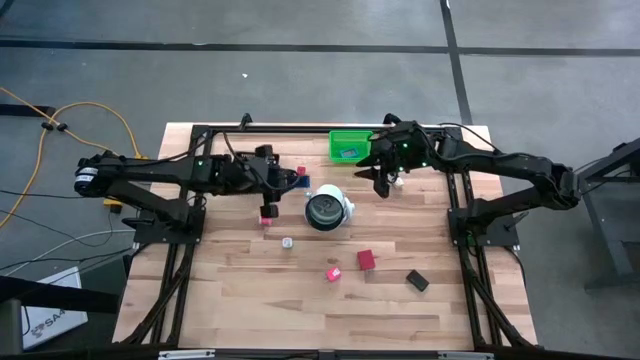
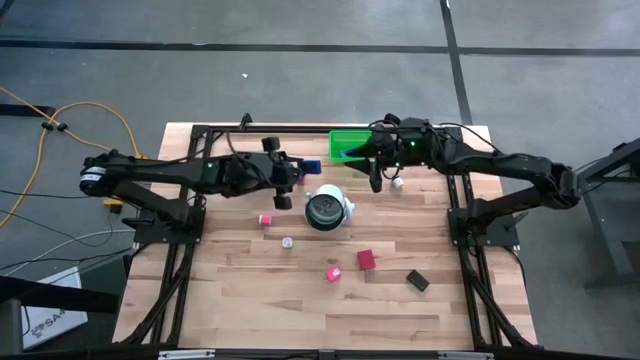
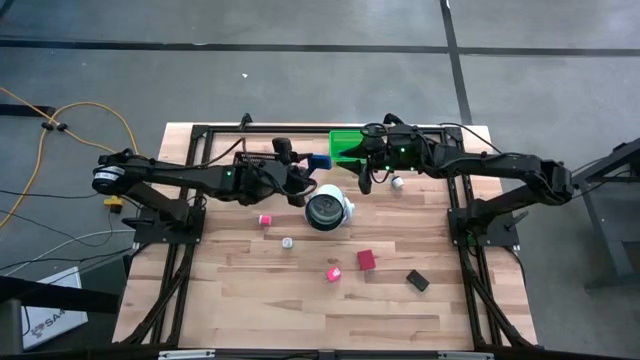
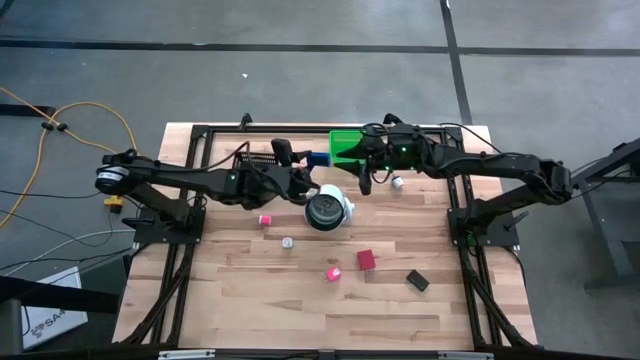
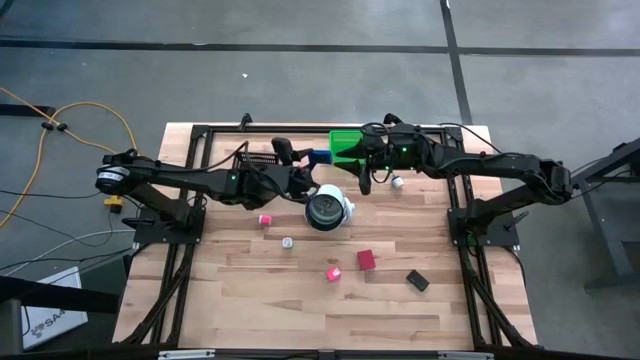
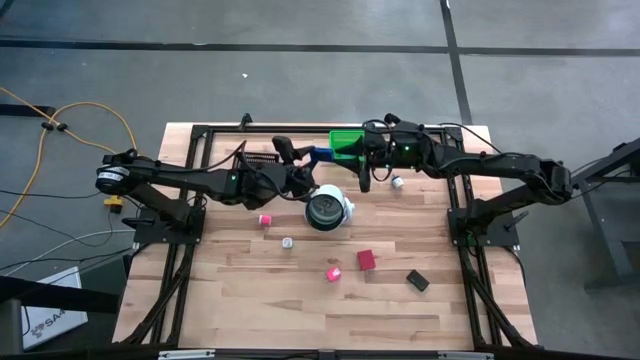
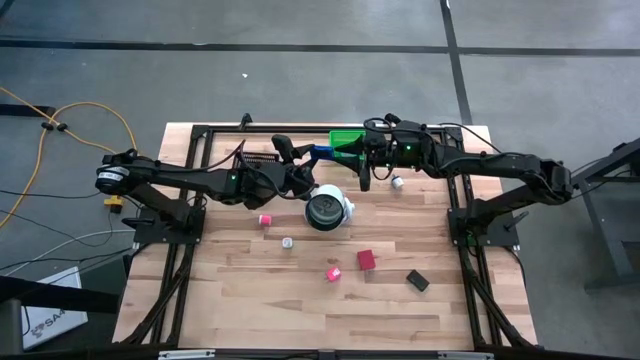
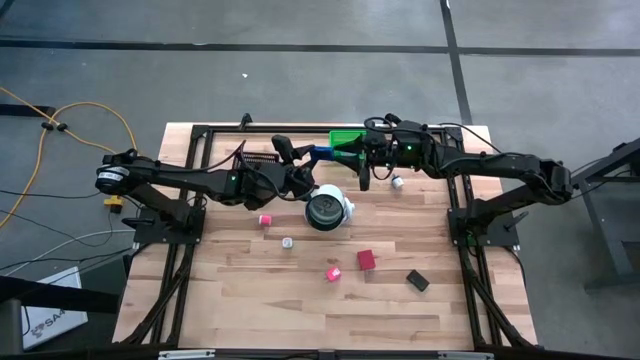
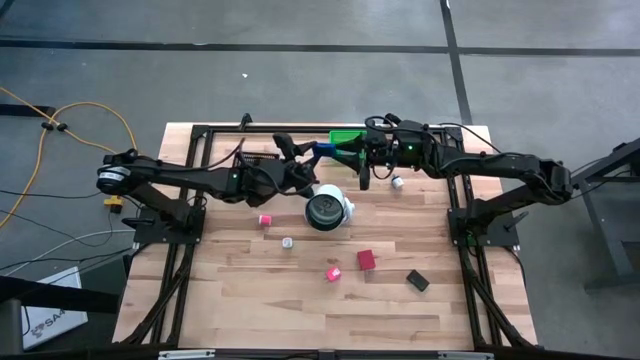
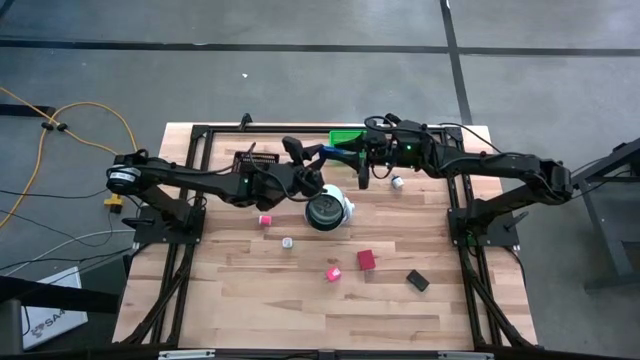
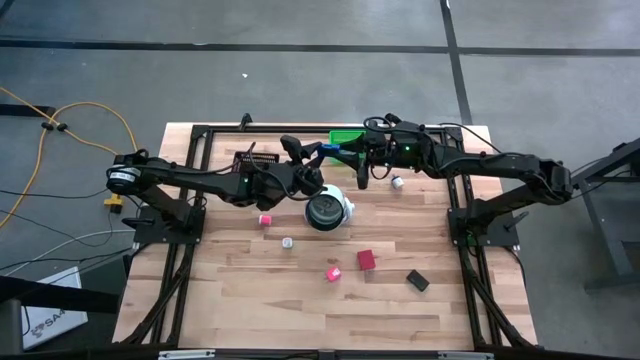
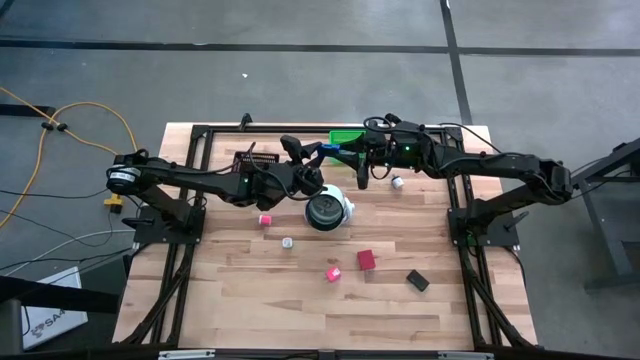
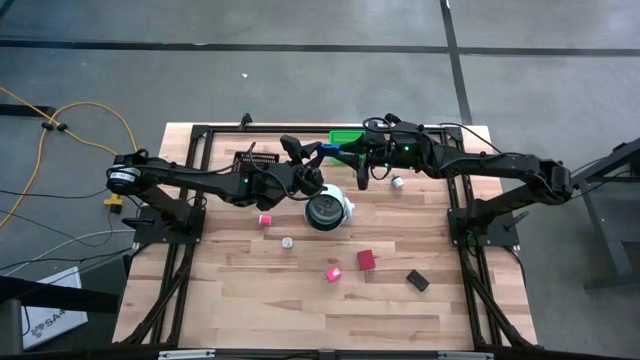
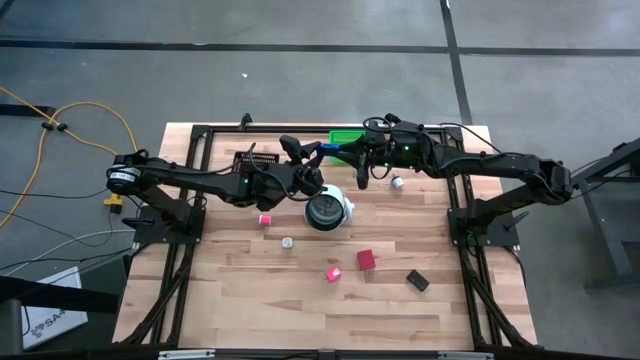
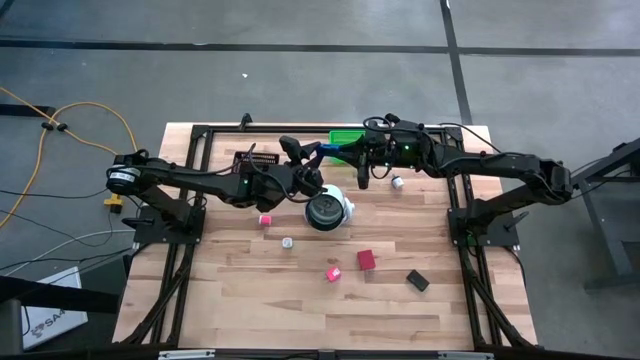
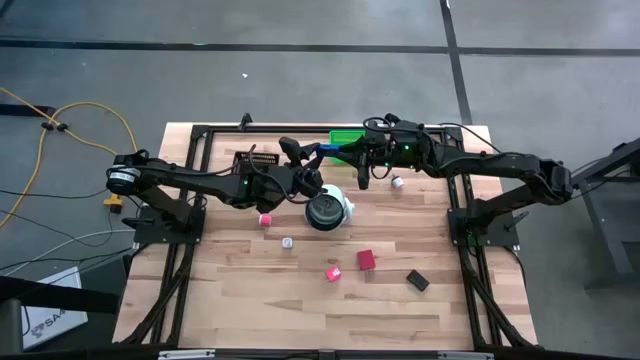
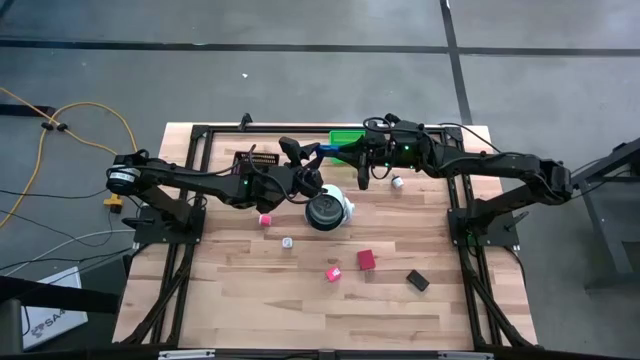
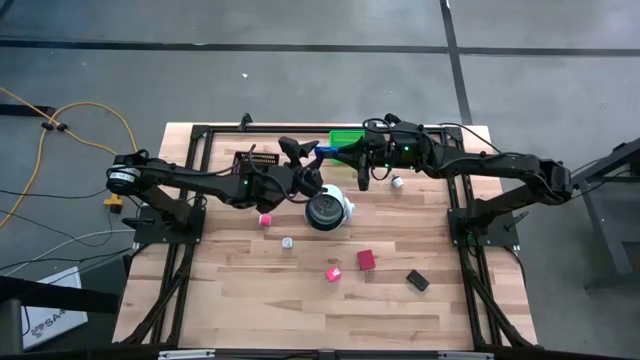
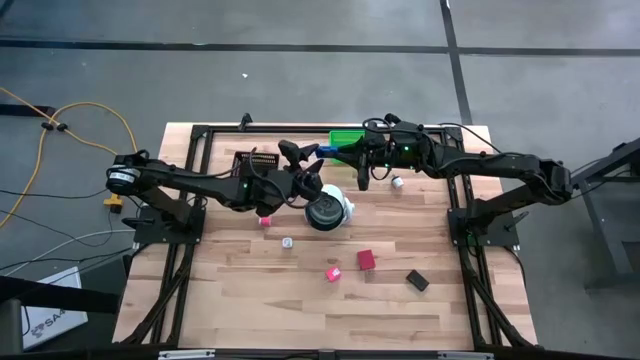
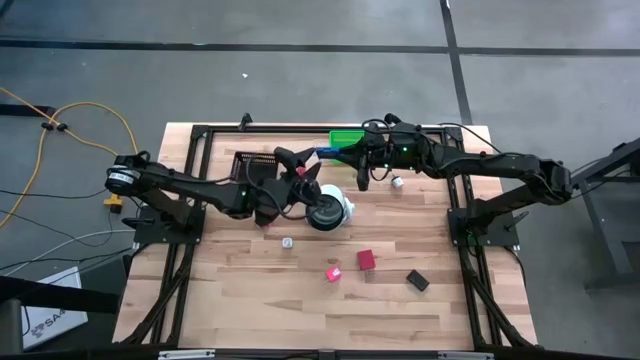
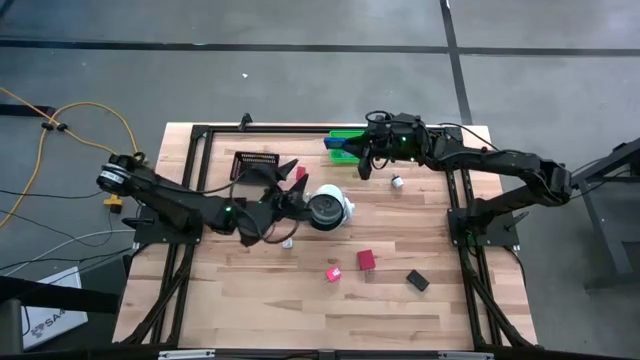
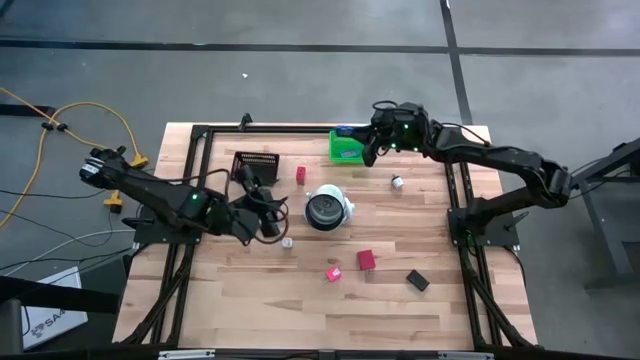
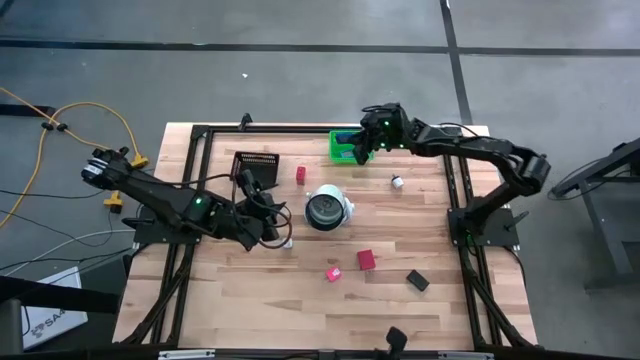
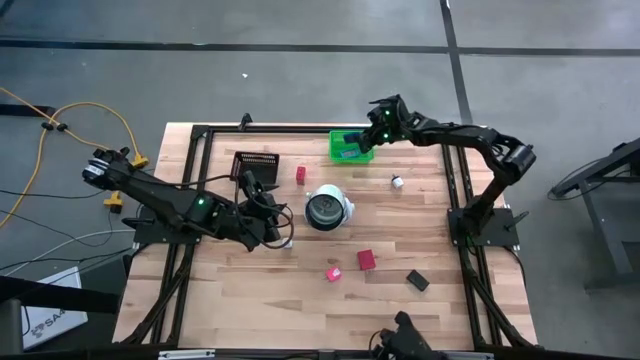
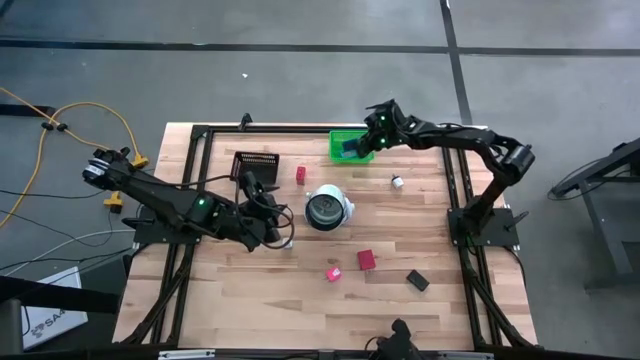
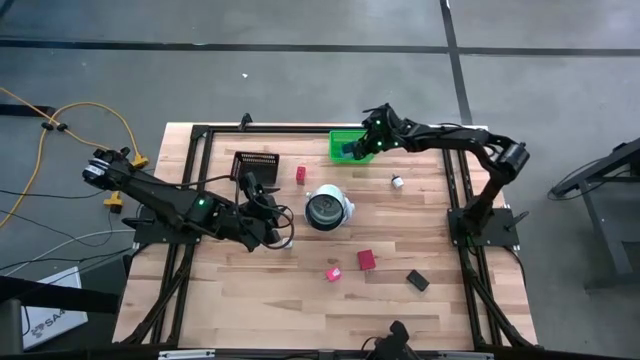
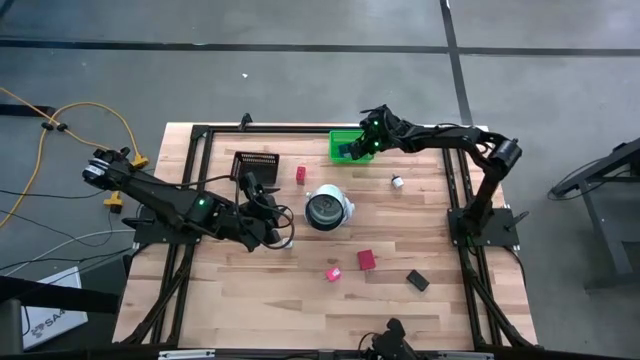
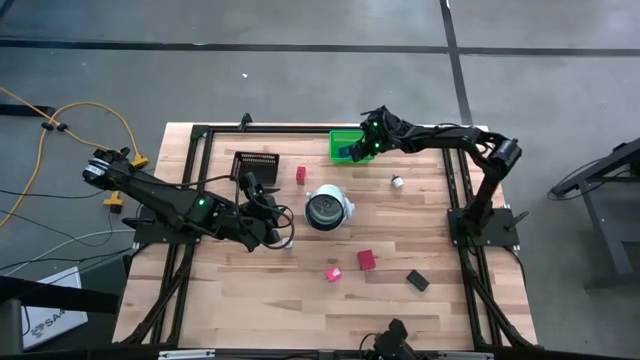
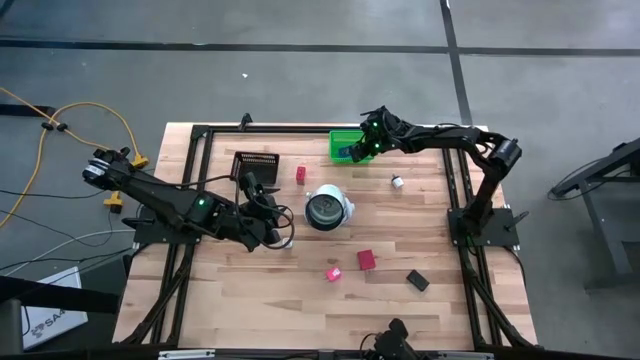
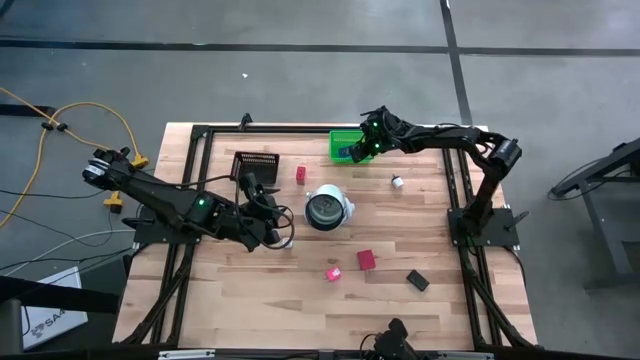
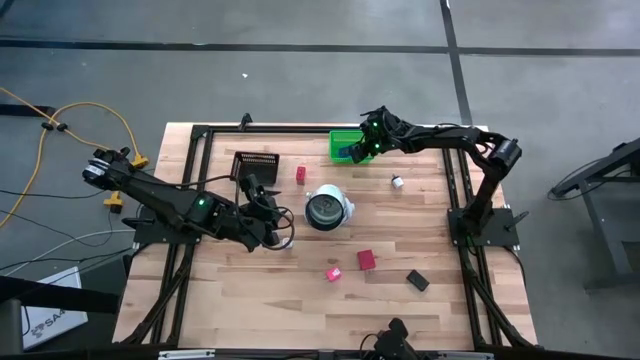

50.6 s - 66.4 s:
Task: Pick & Place Office items
Put the blue digital timer into the green bin

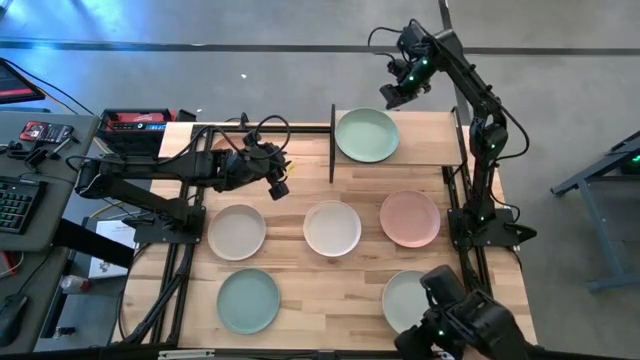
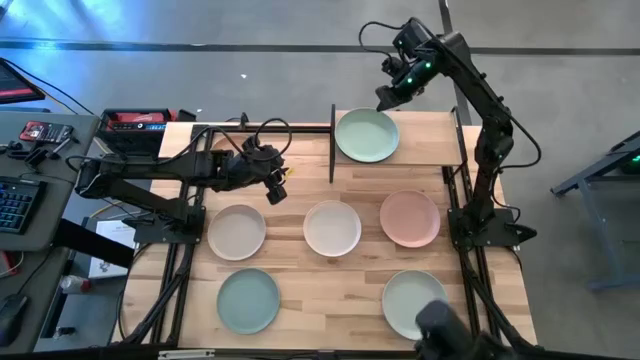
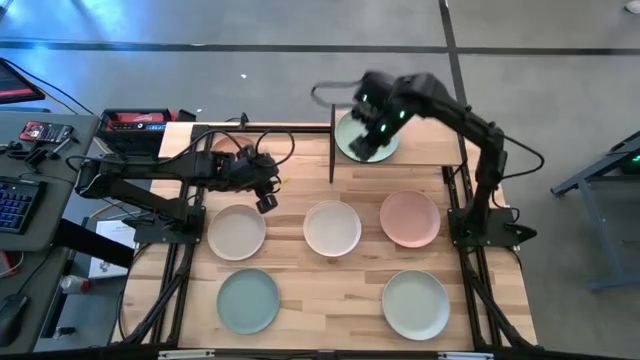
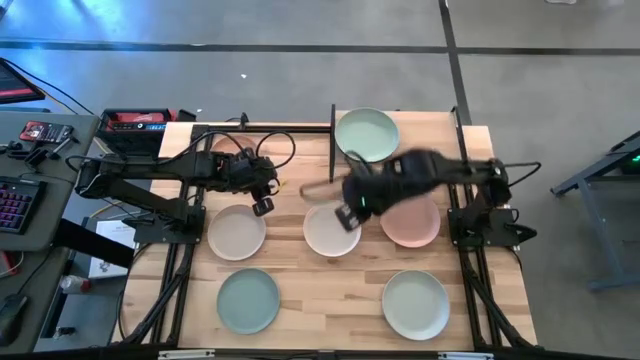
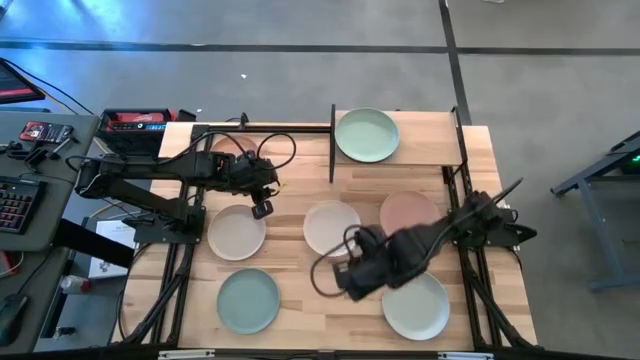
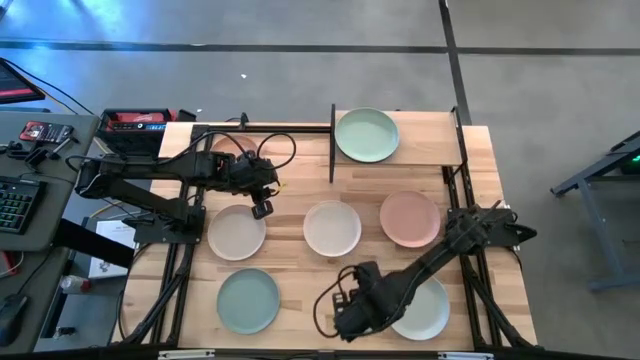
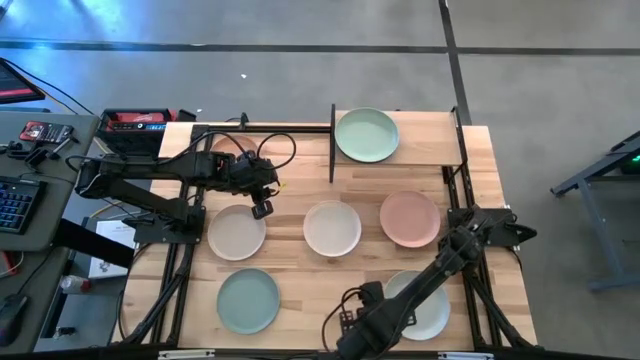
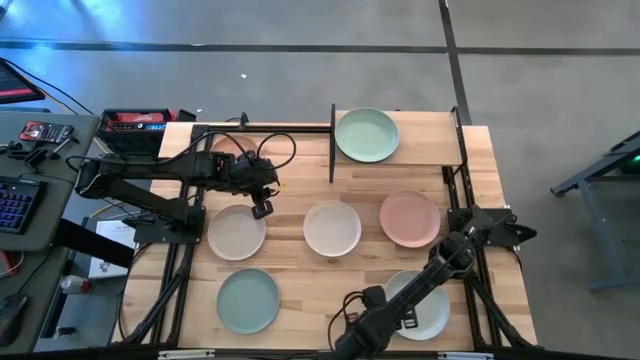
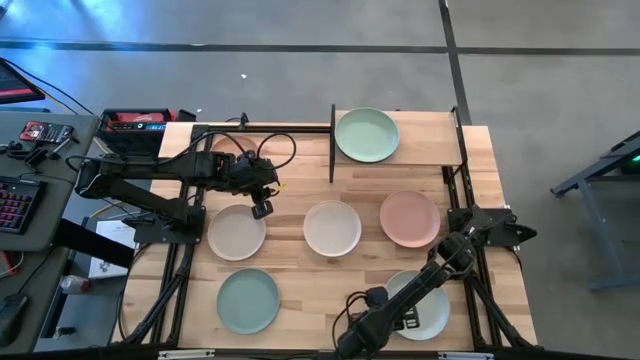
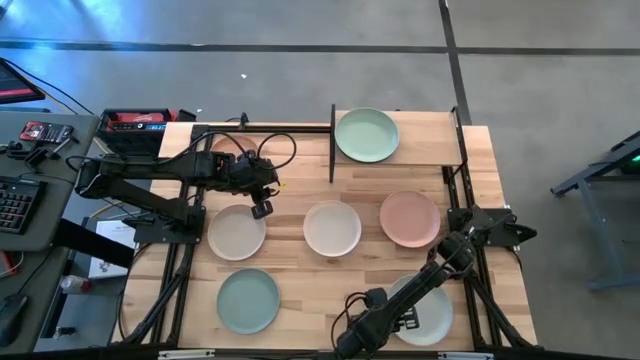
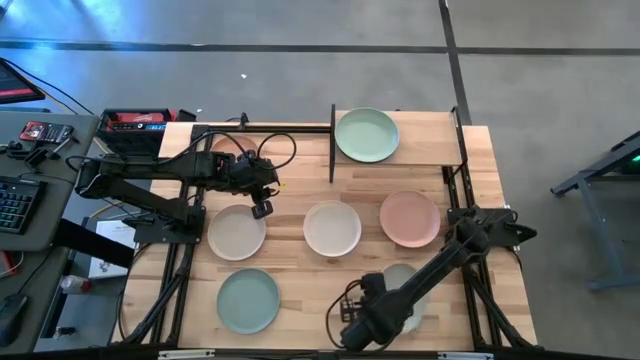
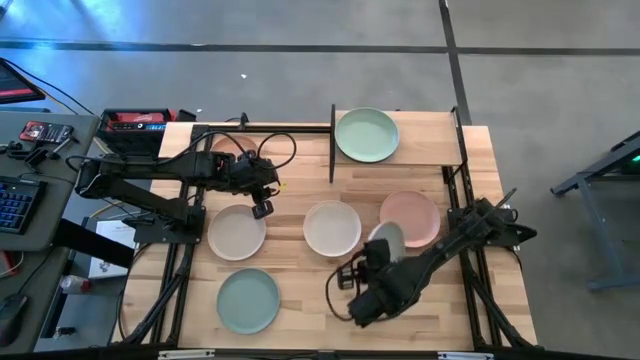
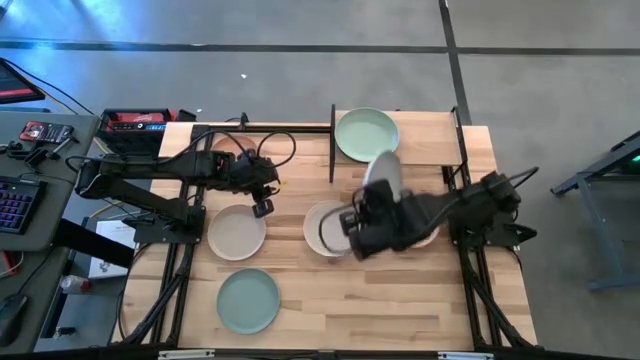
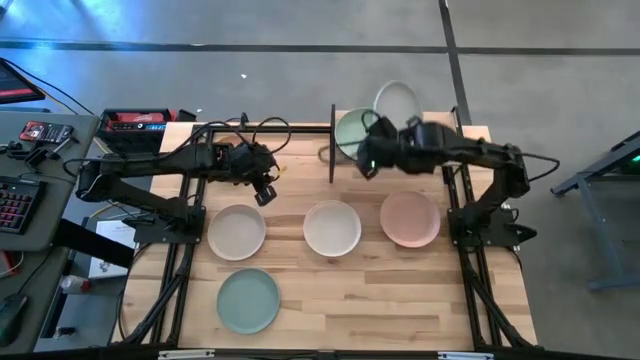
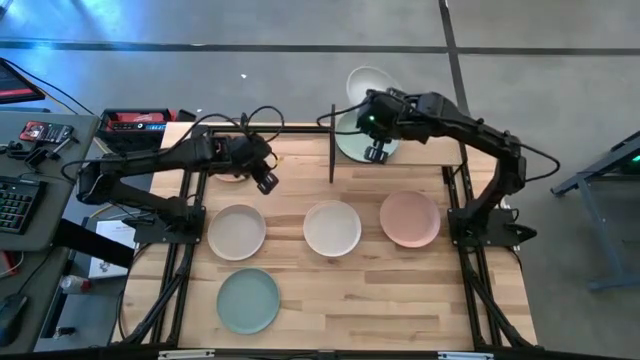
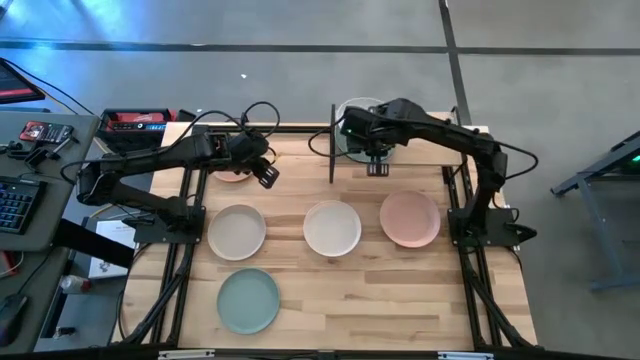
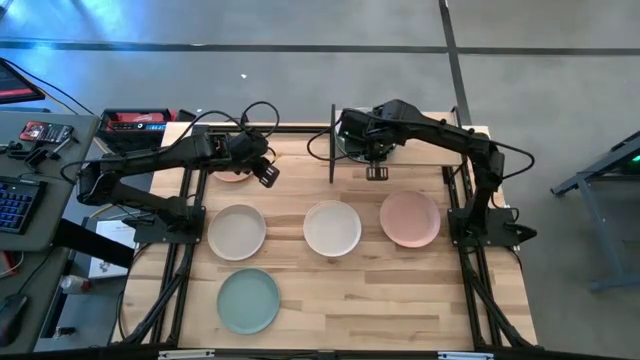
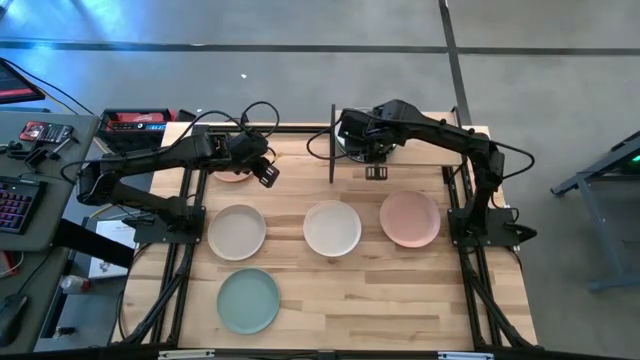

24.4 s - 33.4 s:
Task: Place and stack plates onto a shelf
Stack the bottom white plate on top of the light green plate on the shelf
